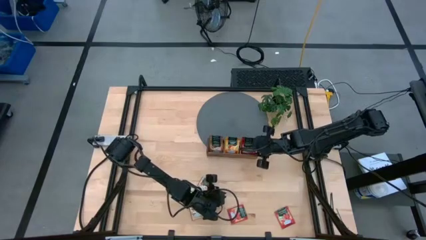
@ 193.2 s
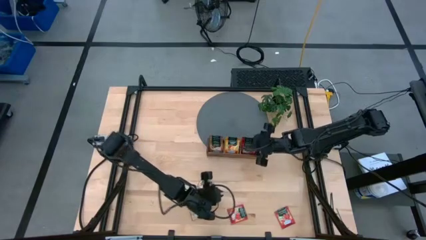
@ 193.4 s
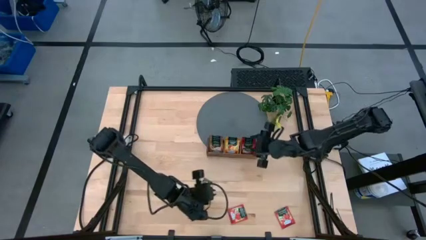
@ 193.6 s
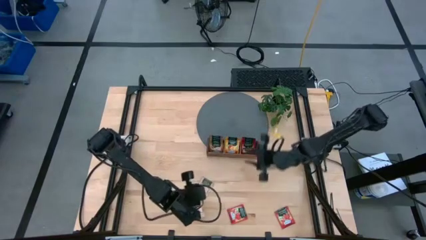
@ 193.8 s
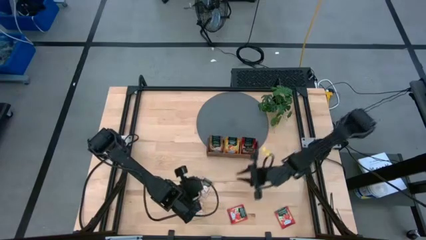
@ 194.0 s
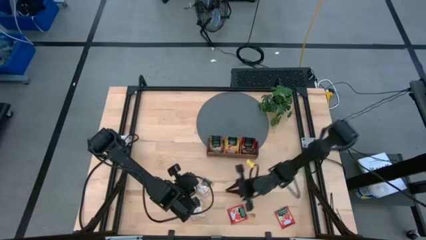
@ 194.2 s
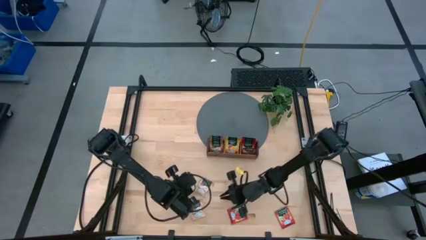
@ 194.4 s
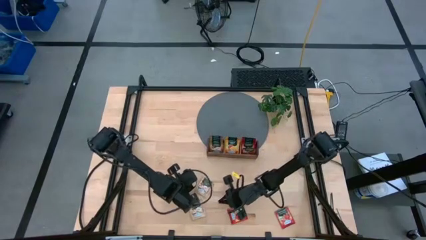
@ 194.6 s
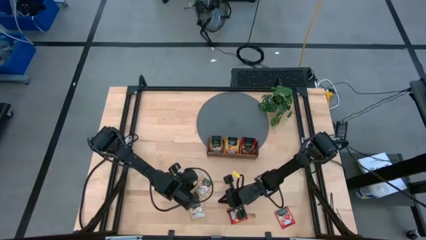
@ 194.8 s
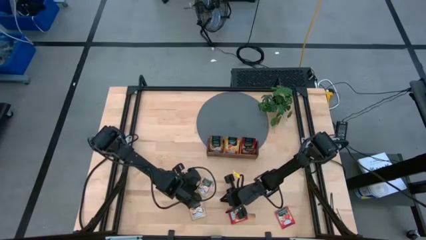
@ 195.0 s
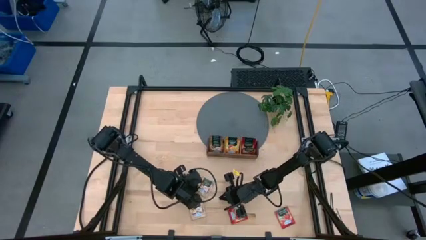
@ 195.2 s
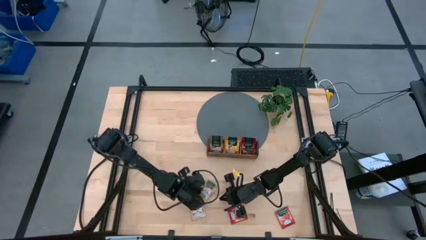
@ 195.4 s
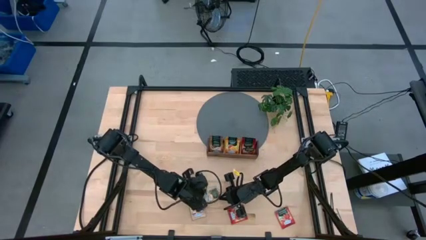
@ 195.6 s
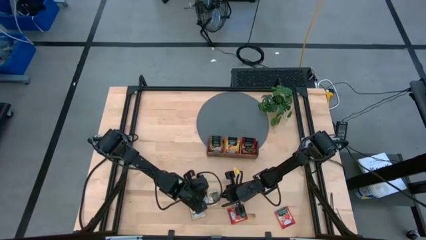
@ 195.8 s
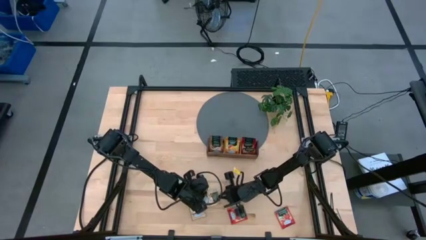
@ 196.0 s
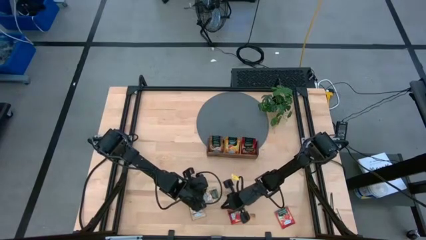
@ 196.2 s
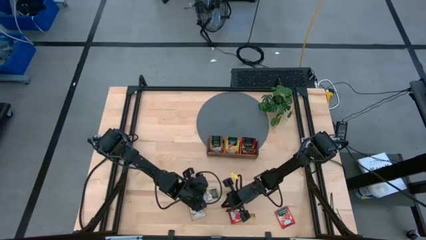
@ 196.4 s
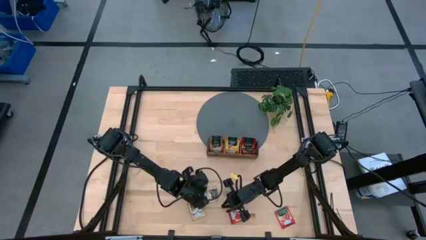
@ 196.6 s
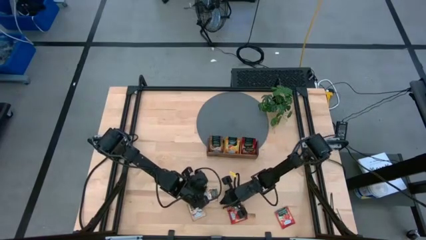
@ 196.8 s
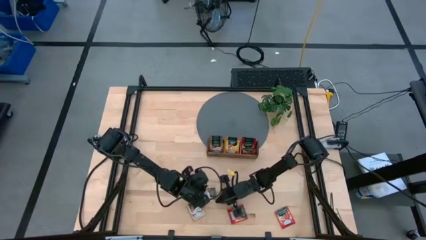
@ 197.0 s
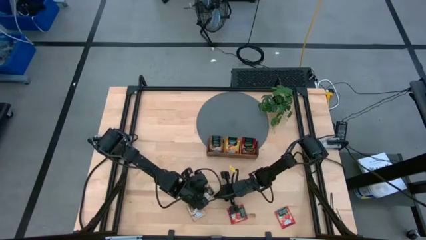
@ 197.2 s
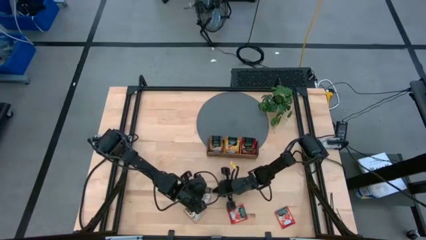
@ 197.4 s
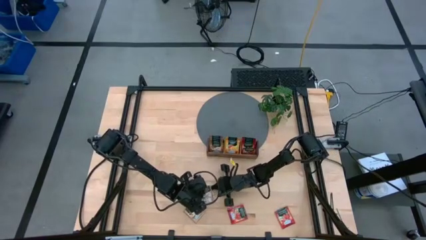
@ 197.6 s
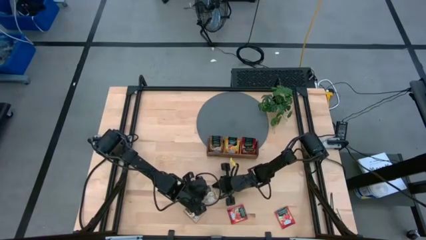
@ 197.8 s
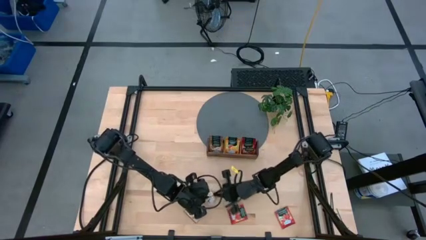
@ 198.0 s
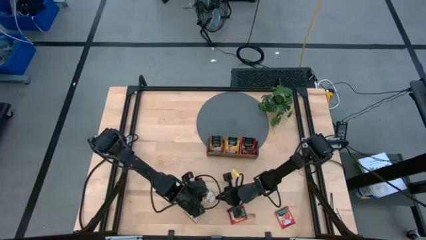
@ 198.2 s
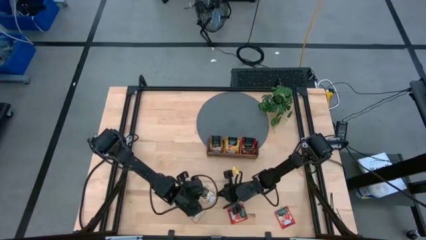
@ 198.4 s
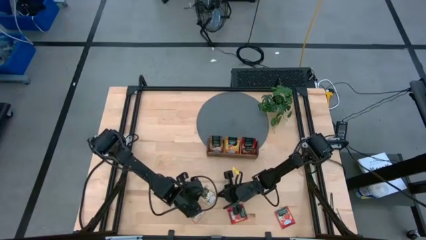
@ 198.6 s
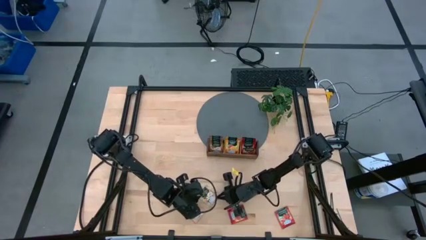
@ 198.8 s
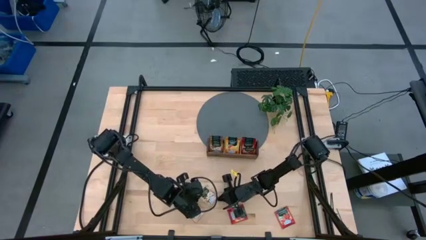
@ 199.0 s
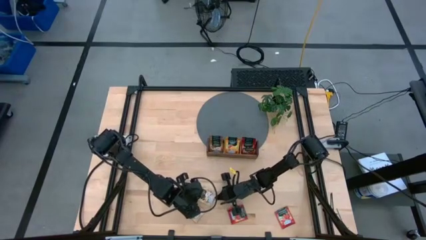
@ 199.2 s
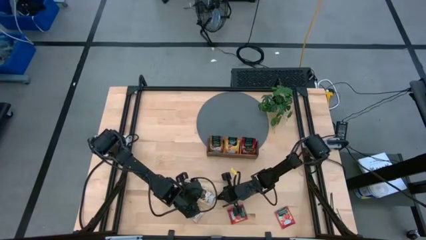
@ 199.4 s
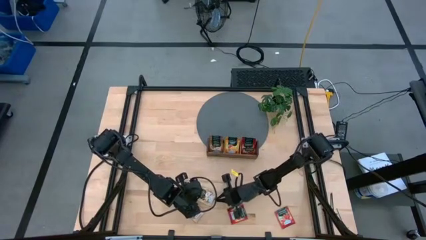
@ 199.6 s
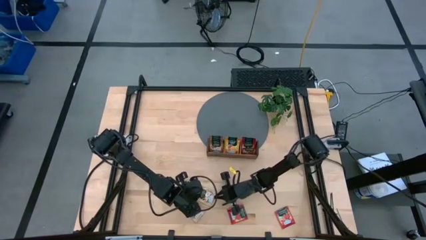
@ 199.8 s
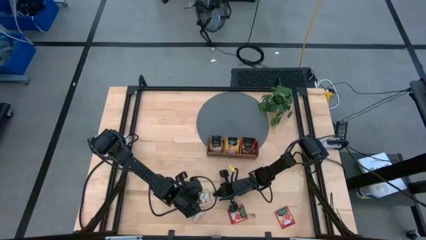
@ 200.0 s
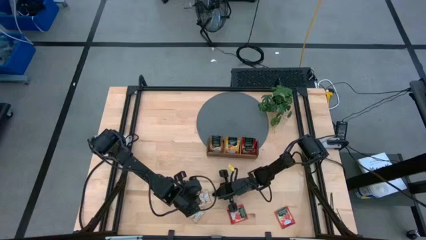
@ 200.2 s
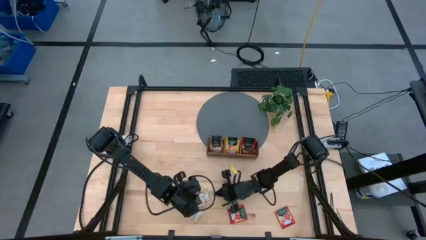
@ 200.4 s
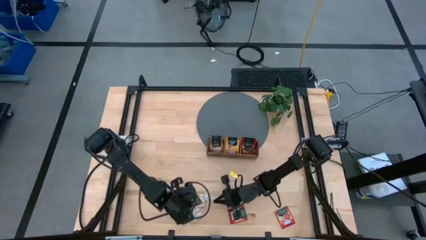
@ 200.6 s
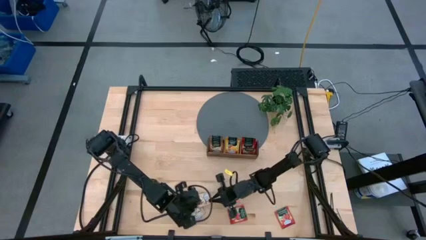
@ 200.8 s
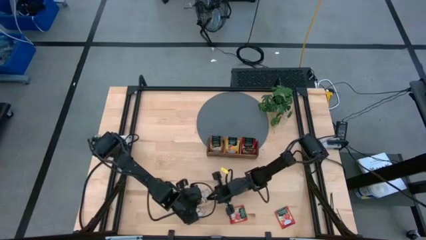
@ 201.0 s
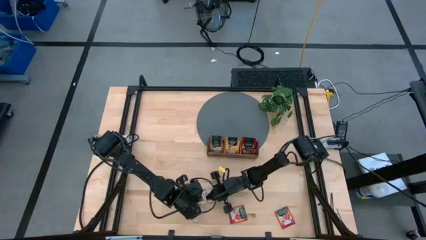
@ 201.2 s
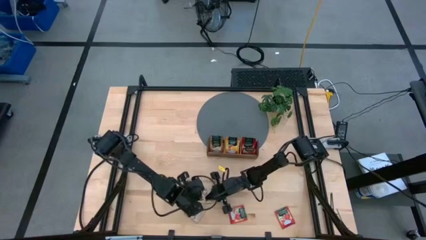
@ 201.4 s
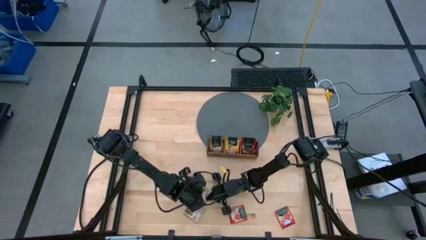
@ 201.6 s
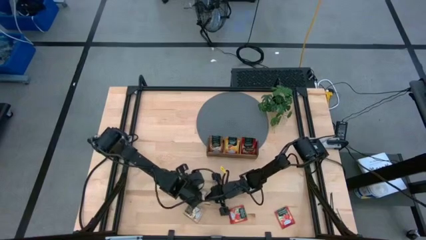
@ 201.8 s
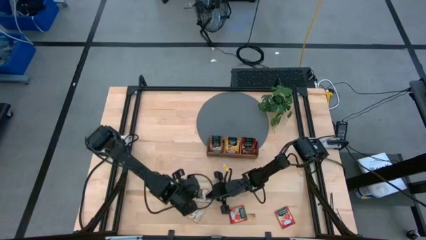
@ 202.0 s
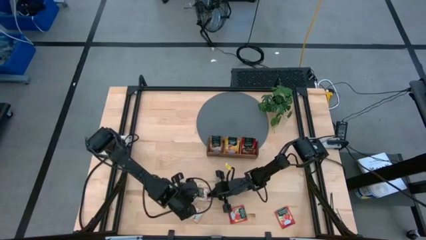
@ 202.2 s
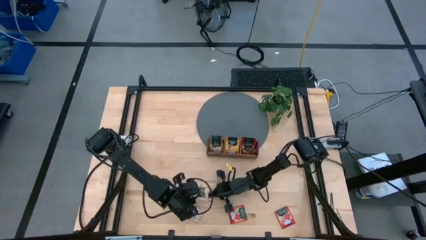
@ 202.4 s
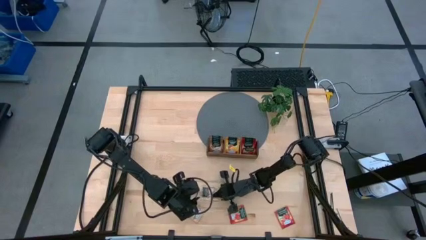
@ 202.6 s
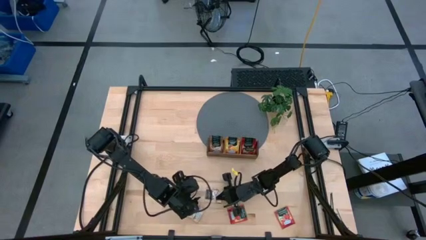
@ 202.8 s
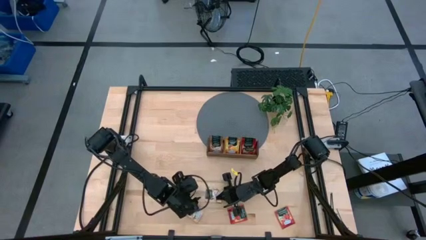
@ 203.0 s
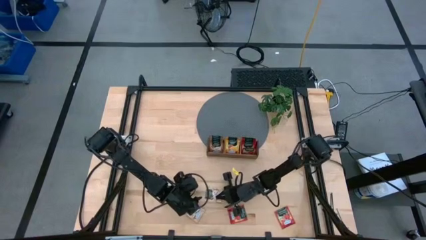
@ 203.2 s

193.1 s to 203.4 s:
Task: Pick & Place Tea
Put the top brown tea bag into the left wooden organizer
